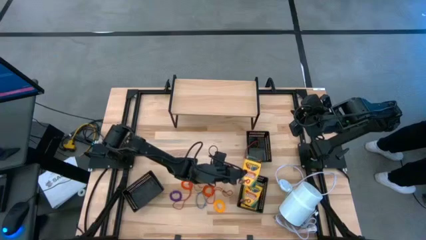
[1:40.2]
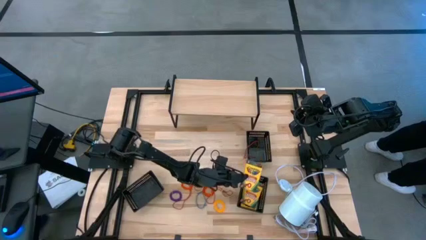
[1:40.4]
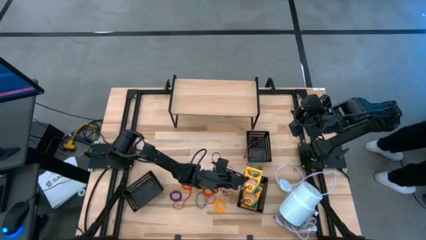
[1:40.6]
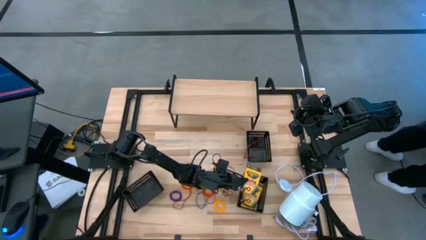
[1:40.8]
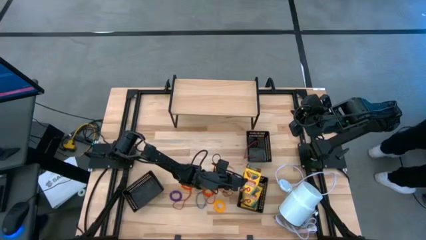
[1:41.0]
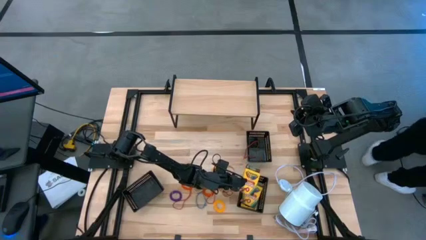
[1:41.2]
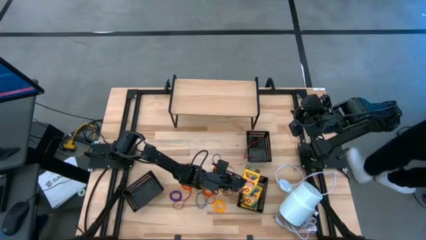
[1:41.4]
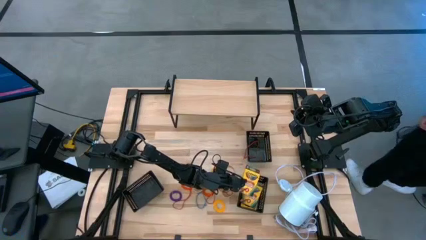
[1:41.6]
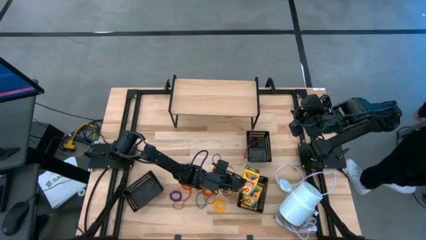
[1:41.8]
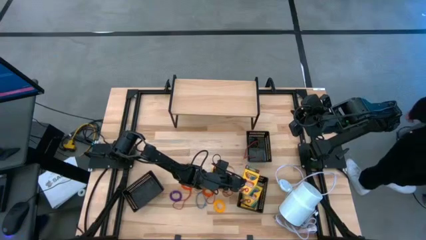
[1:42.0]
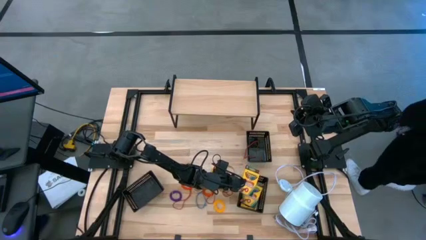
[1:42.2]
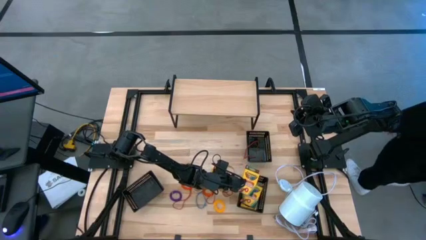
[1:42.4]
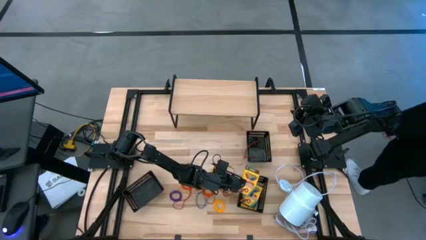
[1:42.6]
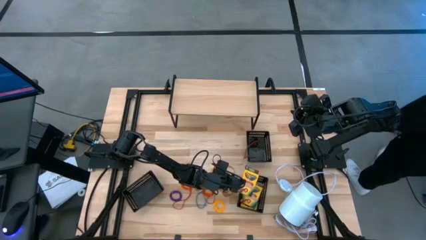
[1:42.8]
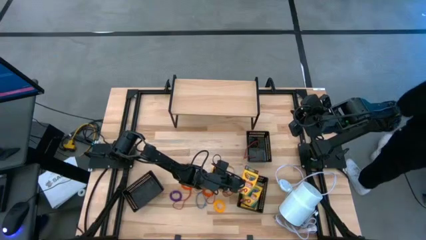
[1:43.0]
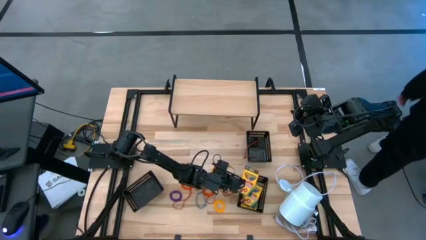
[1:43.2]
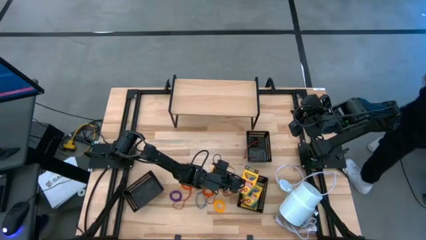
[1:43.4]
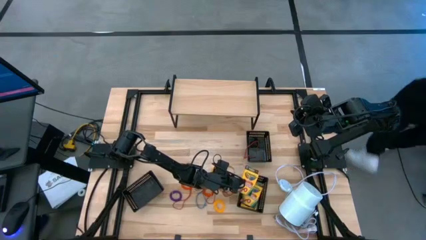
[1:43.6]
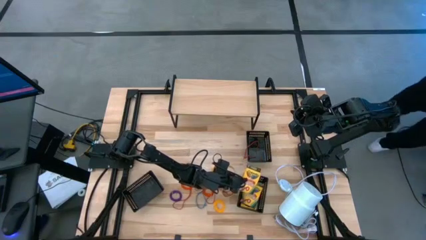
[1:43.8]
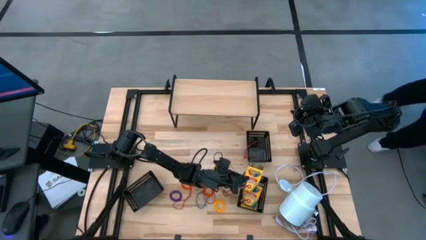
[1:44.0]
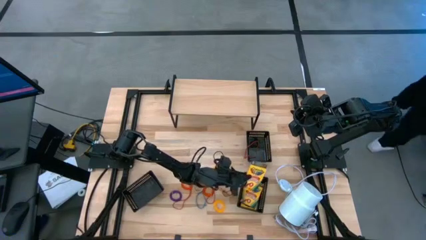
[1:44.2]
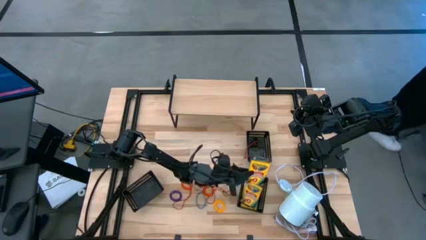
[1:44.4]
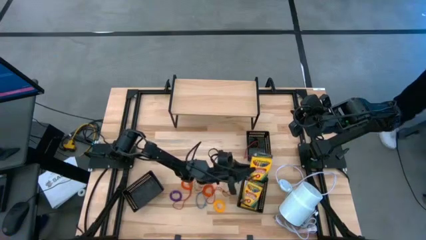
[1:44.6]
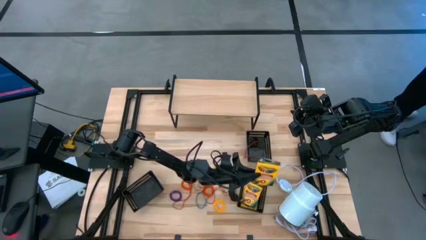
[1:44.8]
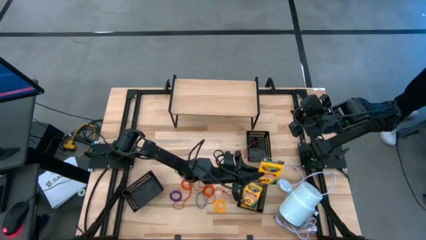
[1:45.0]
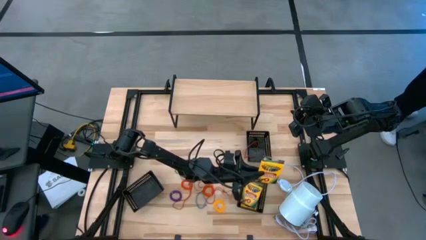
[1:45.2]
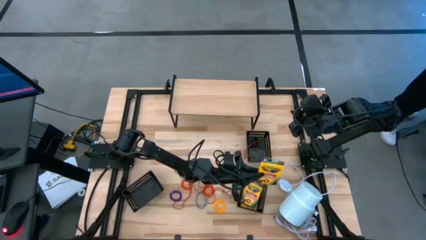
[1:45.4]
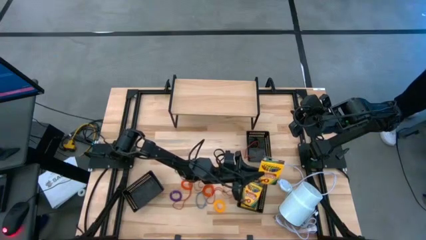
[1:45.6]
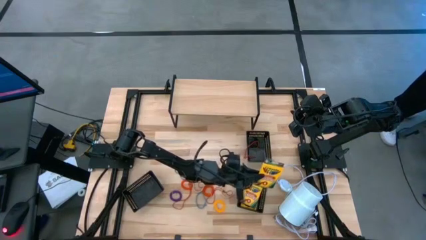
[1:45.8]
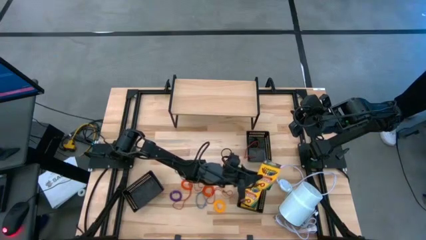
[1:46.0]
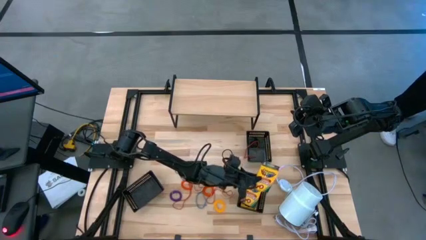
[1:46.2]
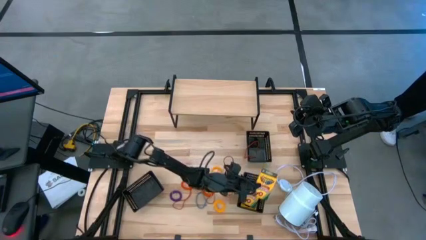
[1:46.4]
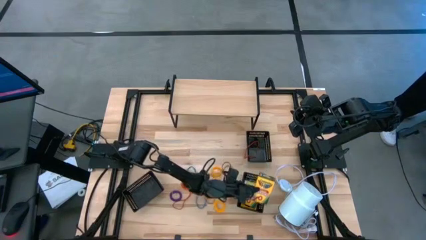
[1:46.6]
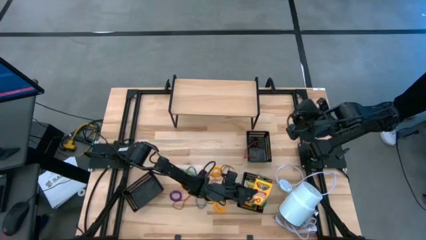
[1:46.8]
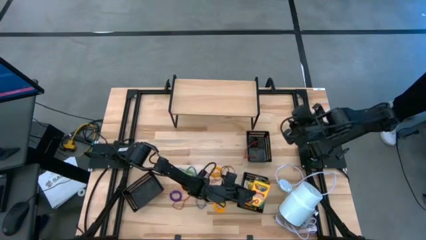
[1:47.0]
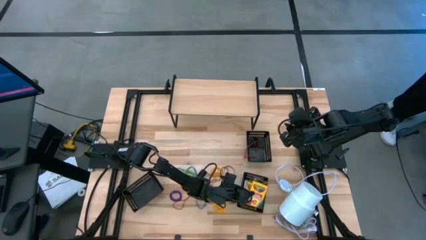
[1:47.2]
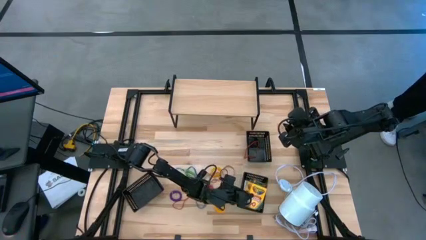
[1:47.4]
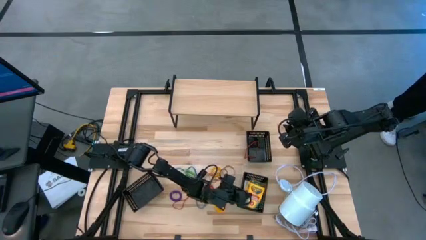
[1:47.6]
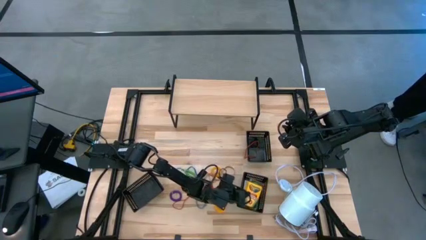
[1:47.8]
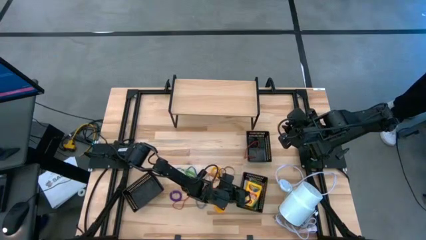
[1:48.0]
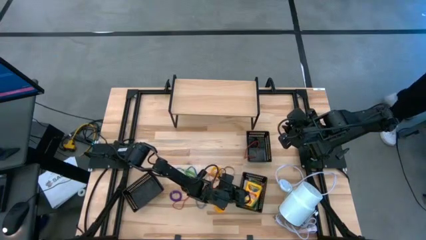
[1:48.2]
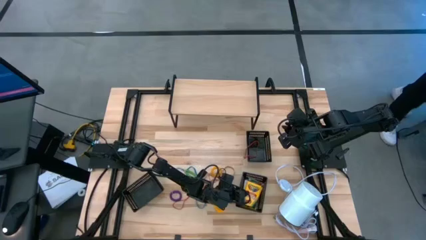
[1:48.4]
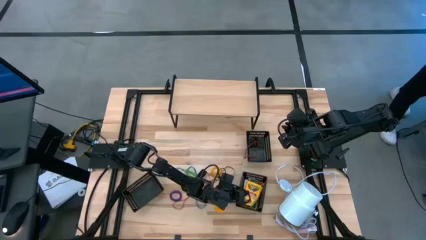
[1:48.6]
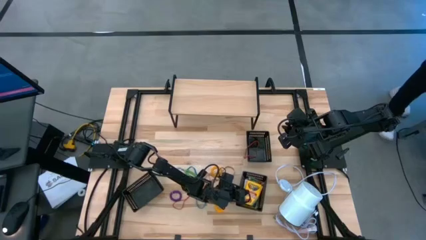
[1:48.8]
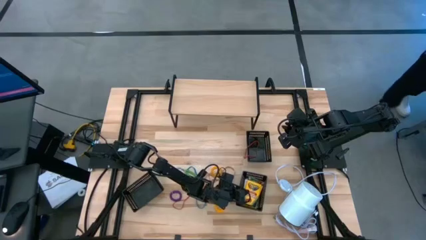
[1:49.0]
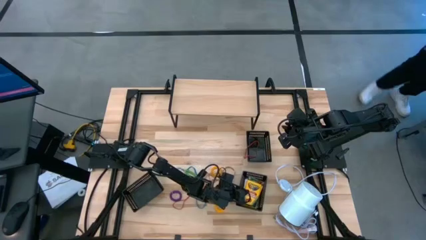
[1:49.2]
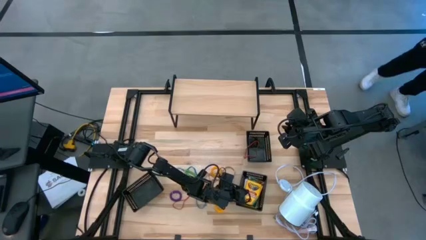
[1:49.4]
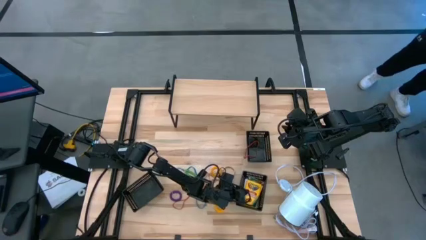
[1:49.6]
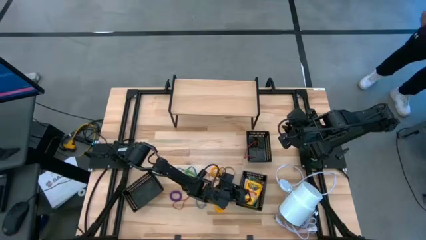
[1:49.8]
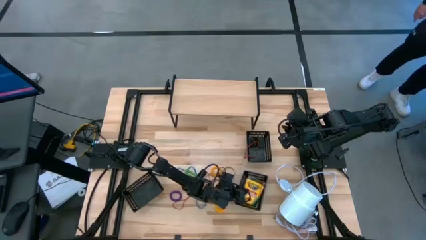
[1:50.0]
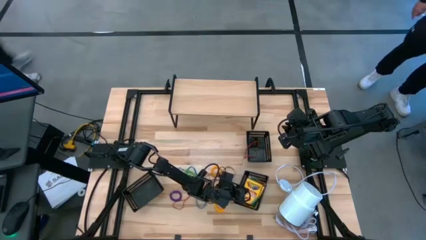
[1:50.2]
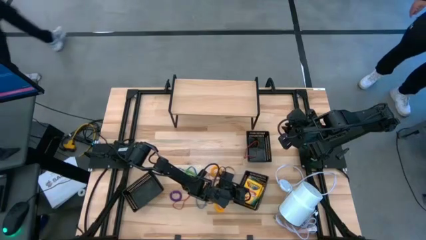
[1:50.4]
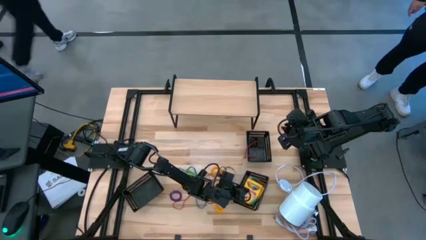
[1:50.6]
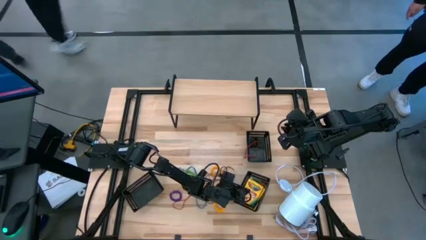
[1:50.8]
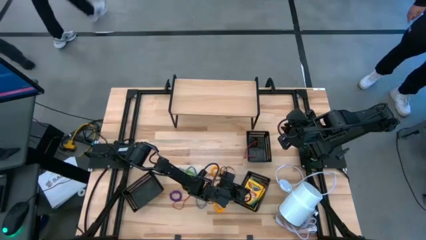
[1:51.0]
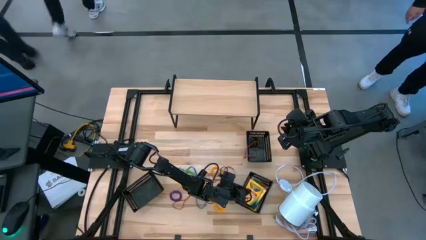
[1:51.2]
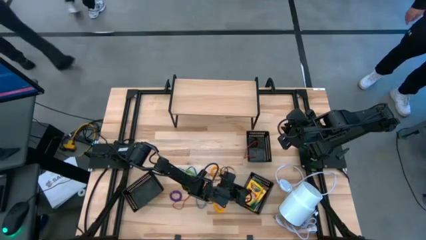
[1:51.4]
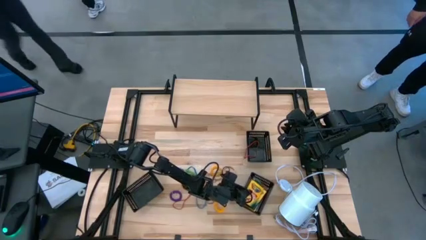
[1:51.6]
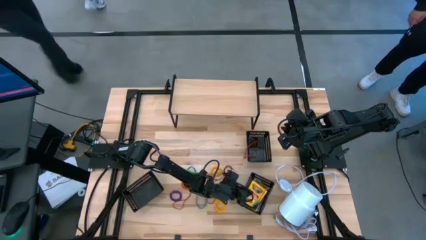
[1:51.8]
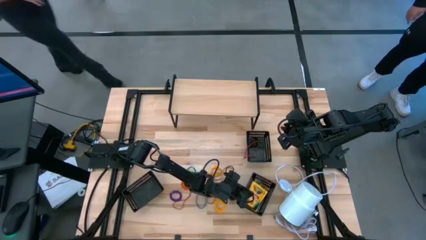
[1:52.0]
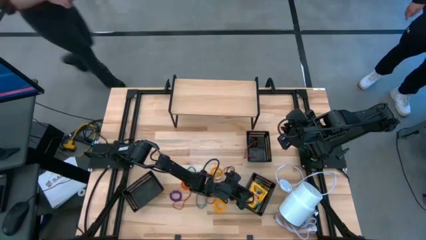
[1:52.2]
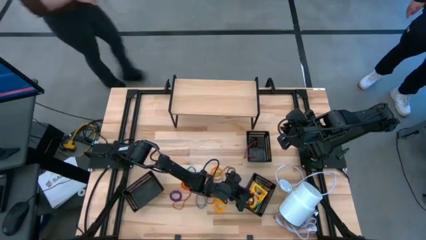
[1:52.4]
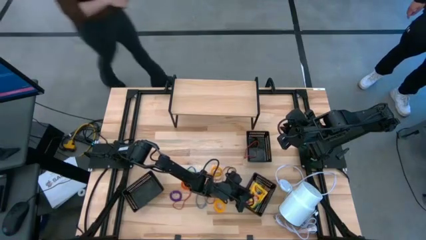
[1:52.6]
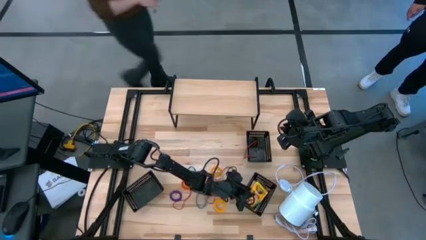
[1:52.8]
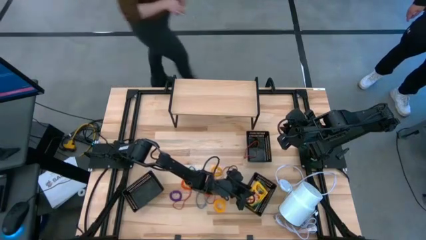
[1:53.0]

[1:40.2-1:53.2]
Task: Pick & Place Office Desk Supplies
Put the crayon box into the bottom right black bin

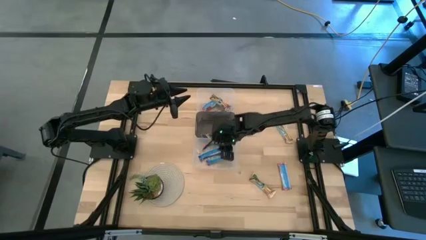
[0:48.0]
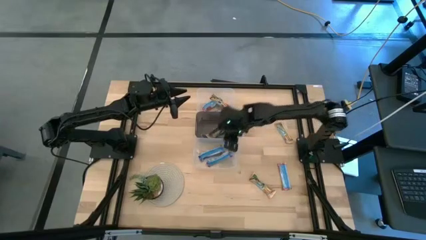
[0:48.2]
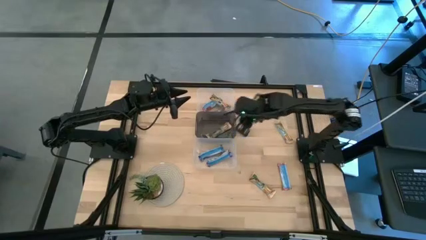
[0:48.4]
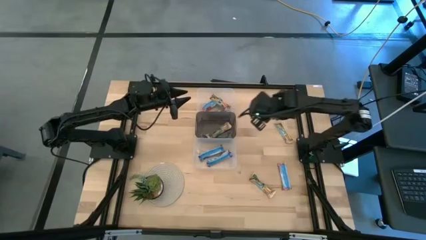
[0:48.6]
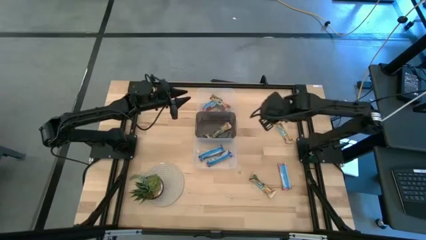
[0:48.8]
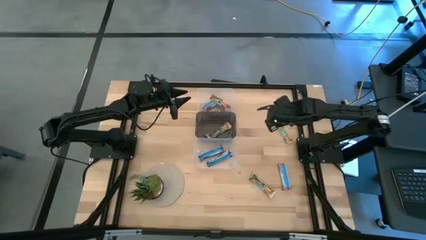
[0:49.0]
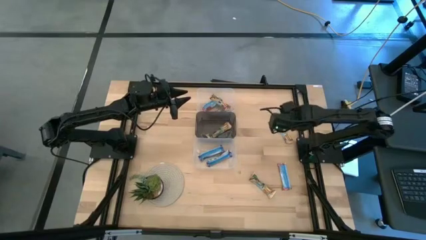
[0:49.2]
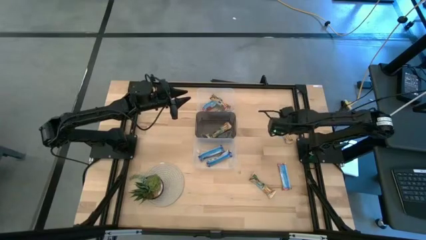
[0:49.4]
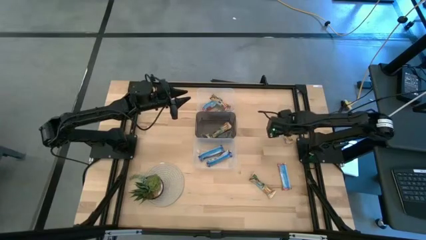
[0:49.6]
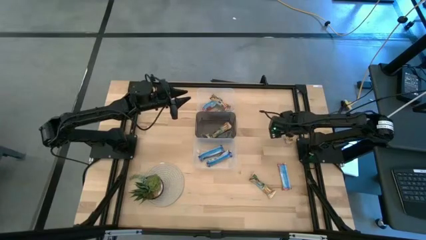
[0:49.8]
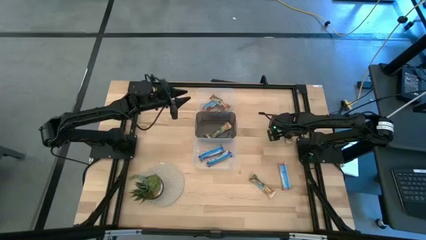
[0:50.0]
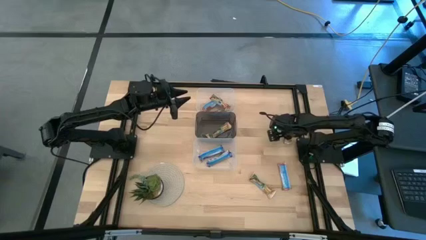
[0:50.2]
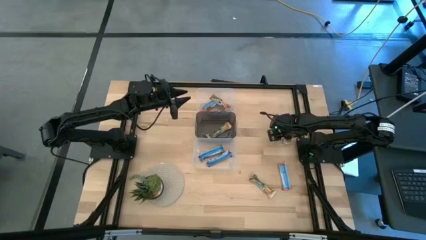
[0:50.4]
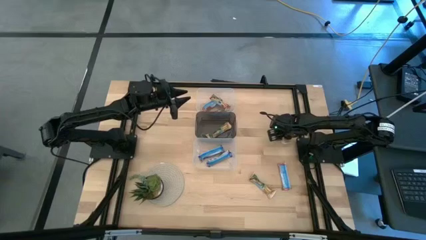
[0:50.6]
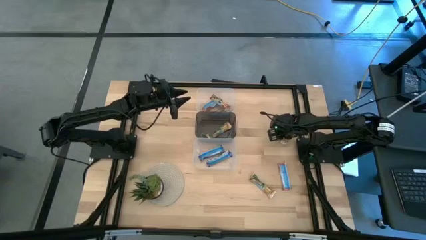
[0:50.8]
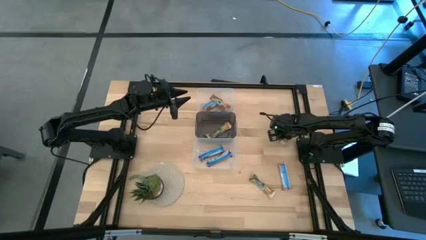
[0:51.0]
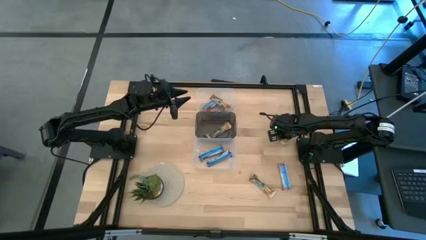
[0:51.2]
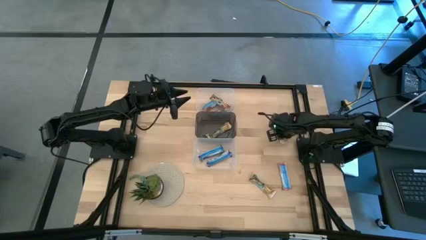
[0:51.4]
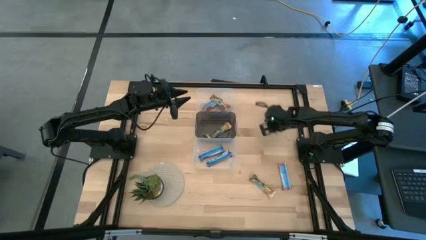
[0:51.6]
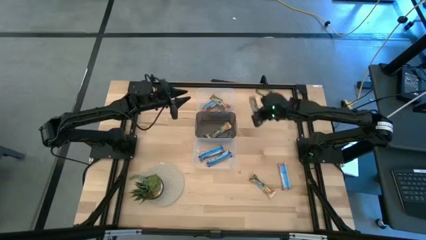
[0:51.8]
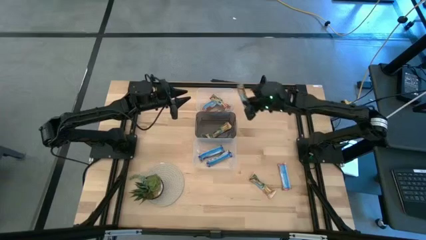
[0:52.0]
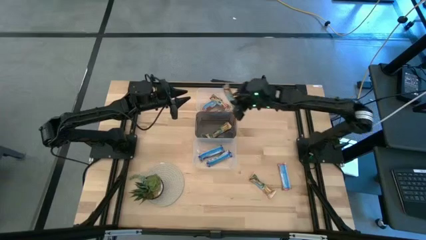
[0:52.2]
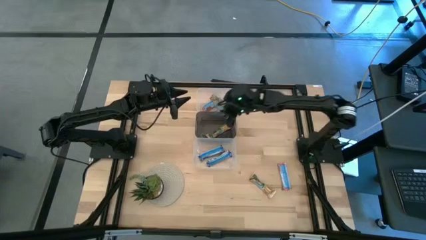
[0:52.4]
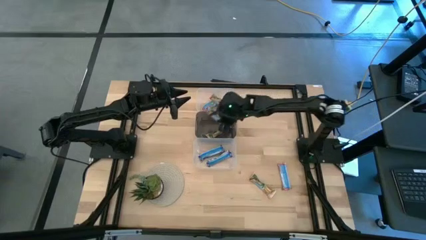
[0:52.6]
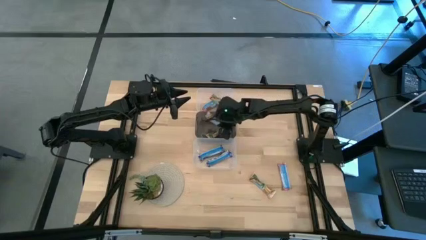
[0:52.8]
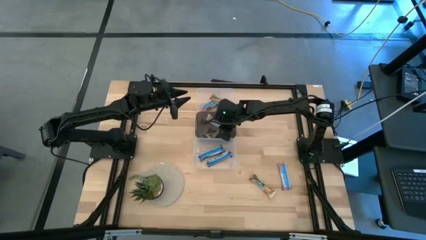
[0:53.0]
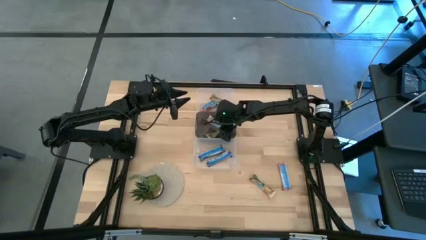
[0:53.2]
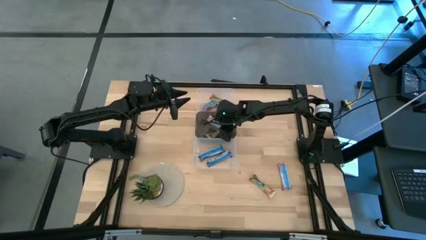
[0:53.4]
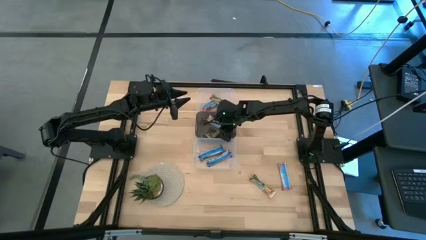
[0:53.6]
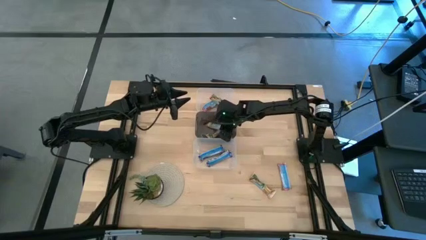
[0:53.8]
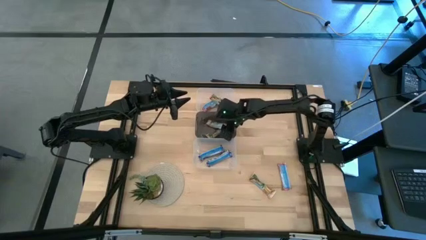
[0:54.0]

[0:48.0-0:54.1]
Task: Pick and place Granola Bars by type
Put the yellow granola bar into the black bin
